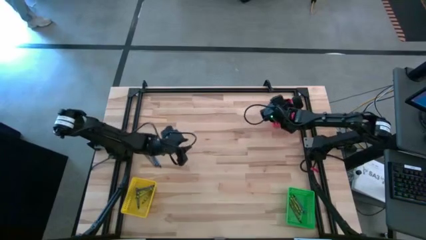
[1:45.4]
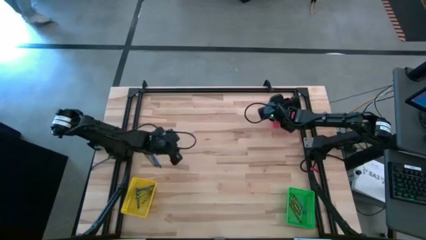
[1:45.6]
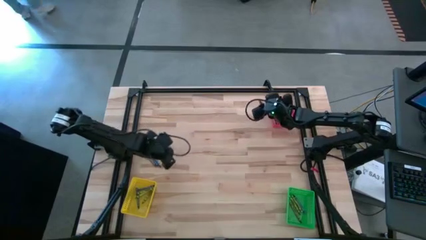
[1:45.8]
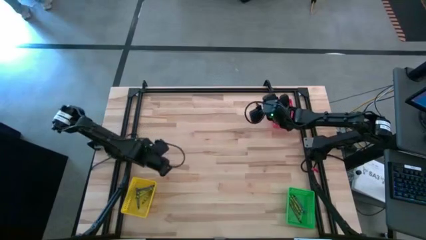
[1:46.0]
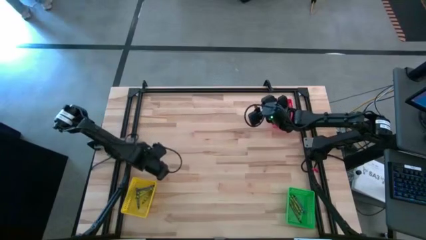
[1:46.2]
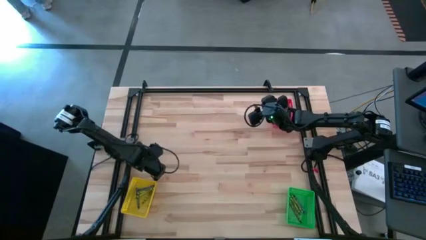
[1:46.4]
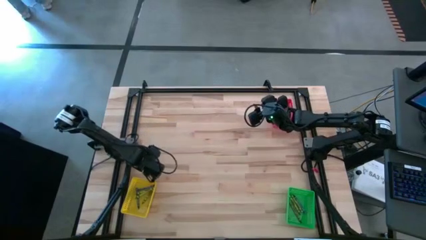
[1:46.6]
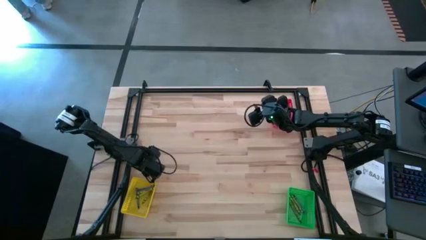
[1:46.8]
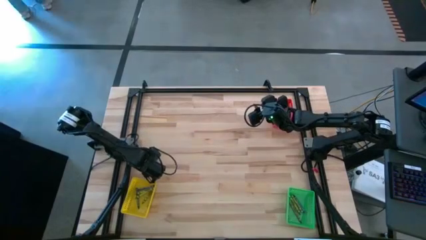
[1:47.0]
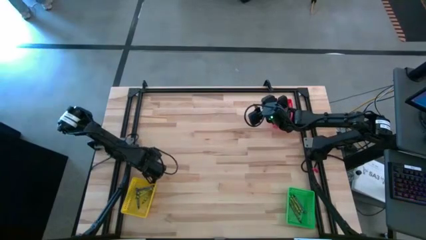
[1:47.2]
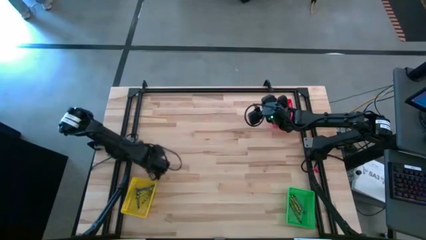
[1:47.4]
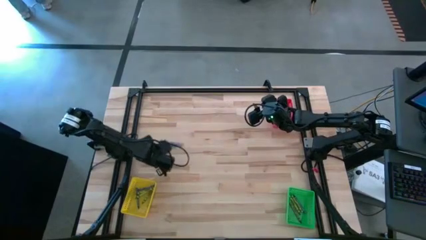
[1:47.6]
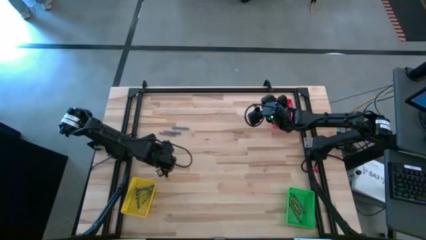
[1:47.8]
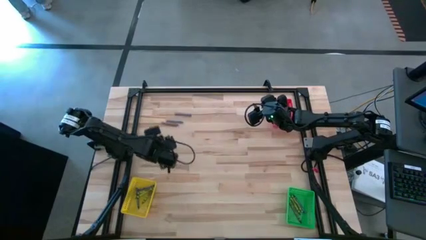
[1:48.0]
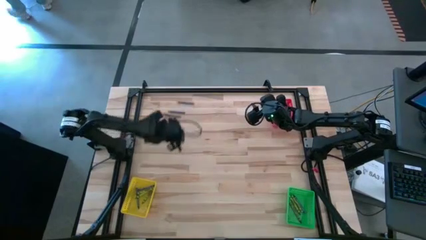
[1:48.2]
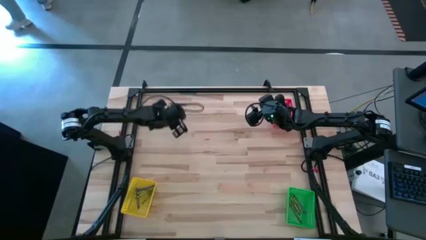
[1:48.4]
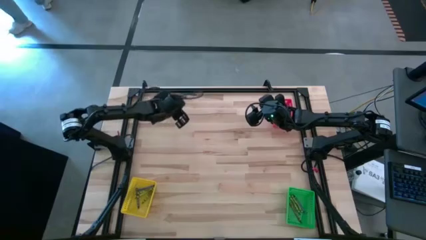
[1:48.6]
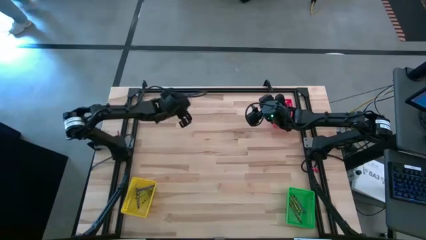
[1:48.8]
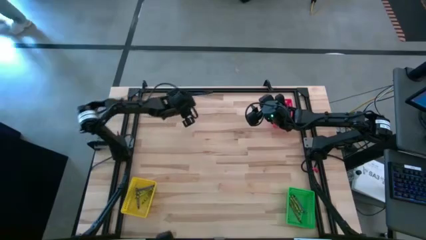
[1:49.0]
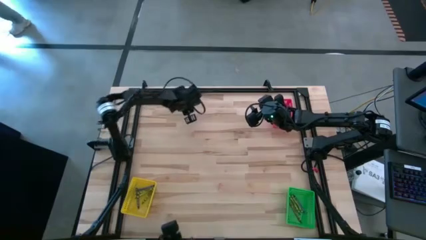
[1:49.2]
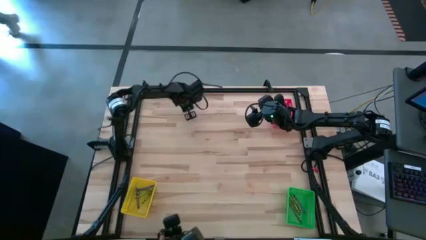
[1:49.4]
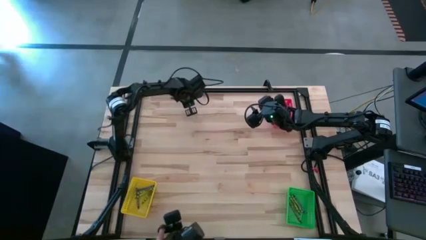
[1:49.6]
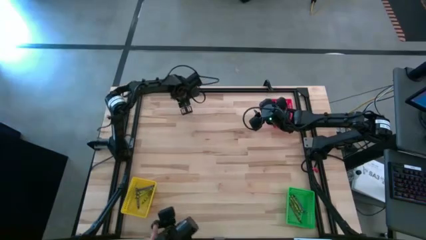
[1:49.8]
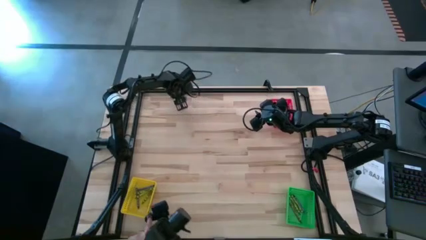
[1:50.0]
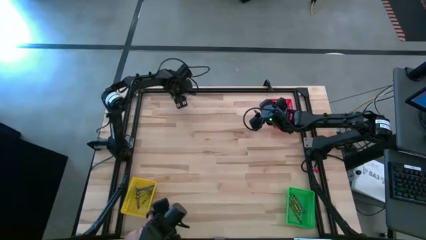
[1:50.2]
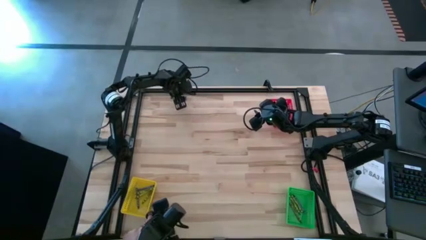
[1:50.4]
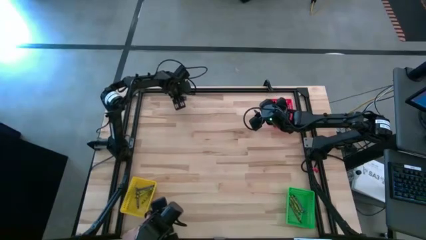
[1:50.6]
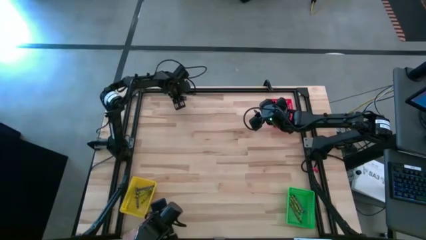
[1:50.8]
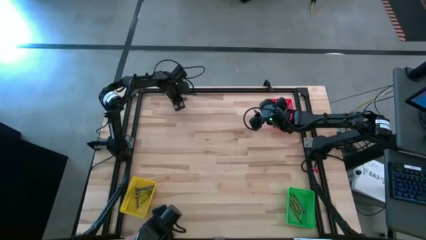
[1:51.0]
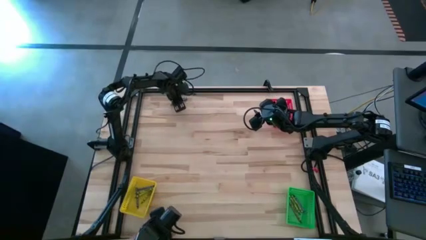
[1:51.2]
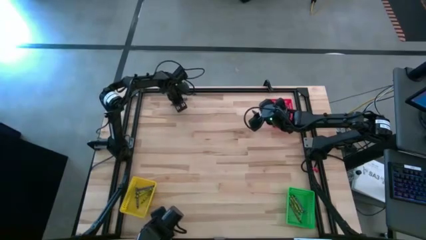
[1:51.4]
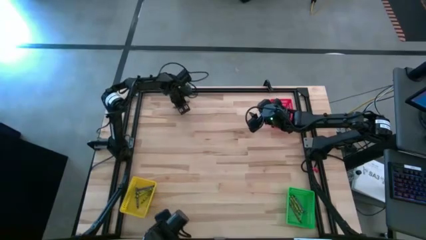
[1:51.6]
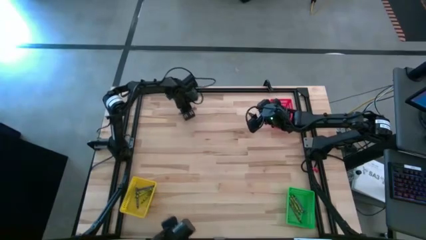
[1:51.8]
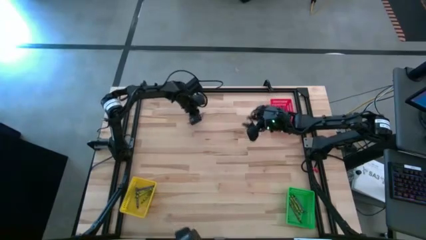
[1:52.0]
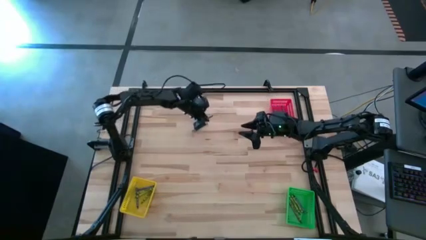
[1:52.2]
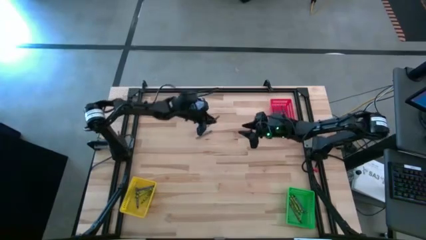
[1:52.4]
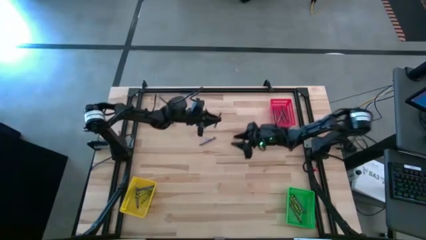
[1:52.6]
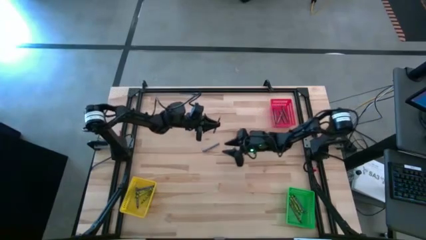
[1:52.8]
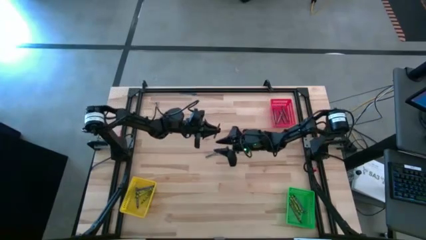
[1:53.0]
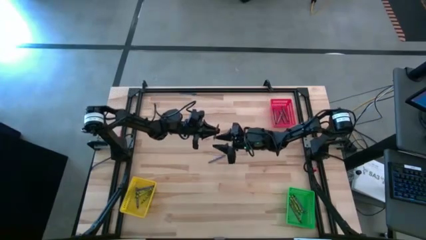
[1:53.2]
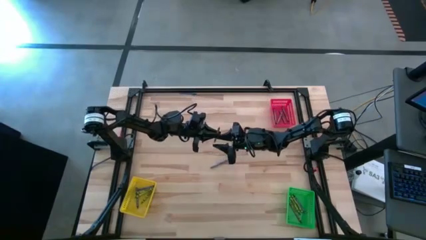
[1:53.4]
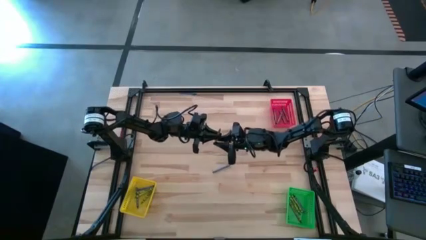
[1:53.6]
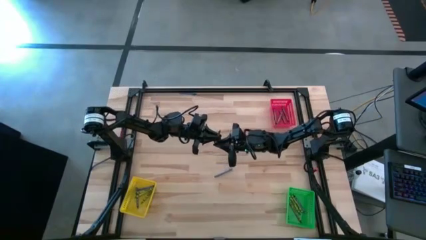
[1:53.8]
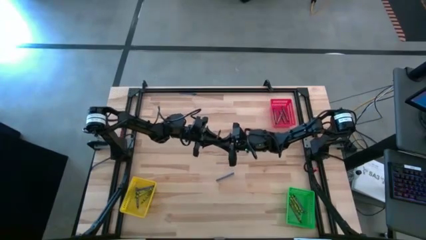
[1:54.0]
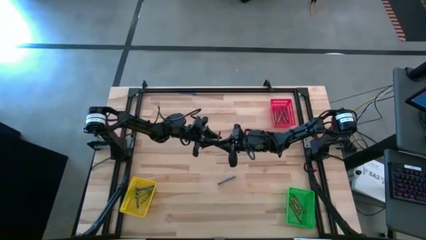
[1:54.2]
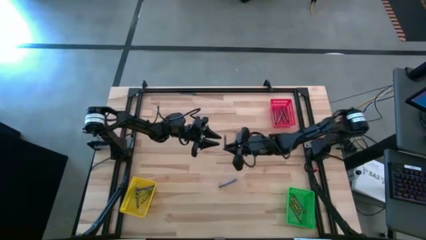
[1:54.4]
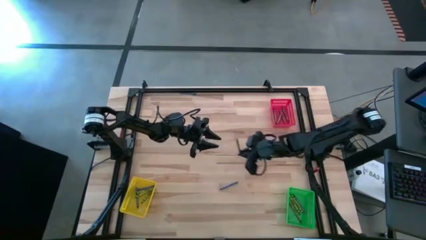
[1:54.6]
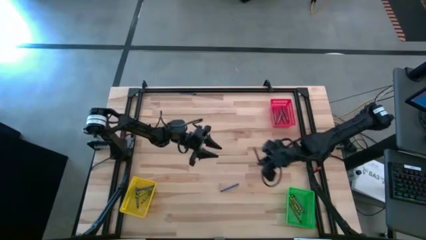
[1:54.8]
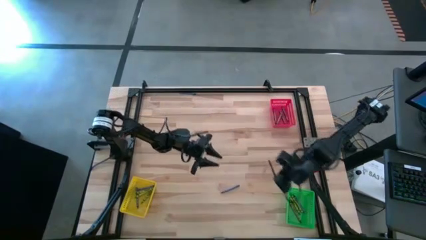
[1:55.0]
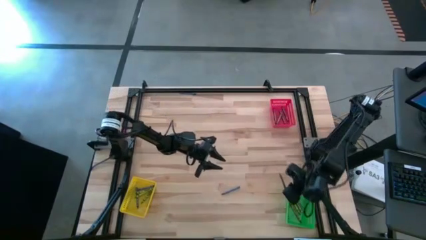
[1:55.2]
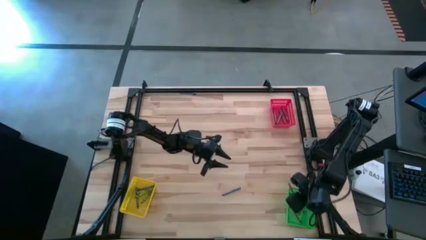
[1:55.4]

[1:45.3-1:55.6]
Task: Sort crayons
Put the brown crayon into the green bin

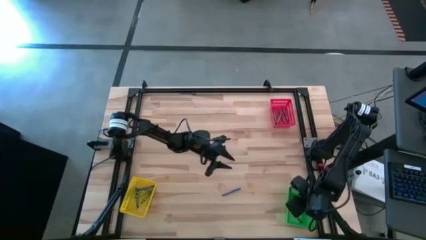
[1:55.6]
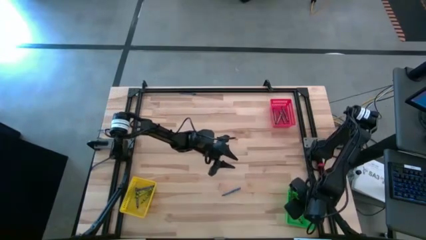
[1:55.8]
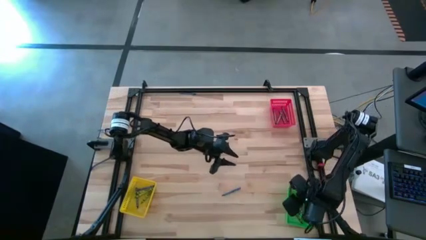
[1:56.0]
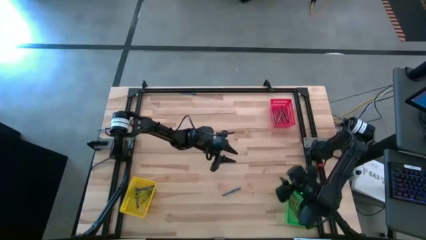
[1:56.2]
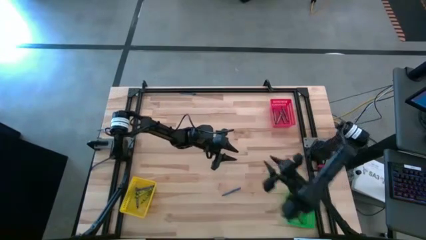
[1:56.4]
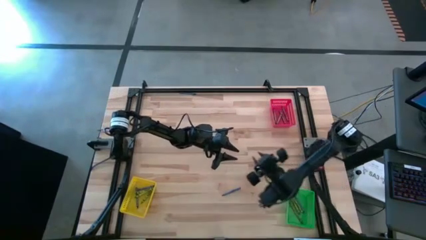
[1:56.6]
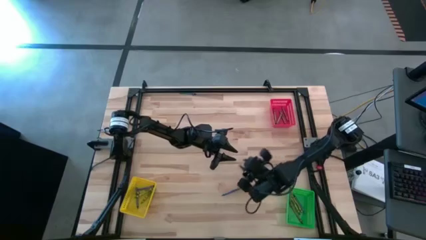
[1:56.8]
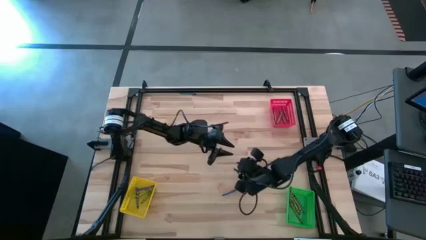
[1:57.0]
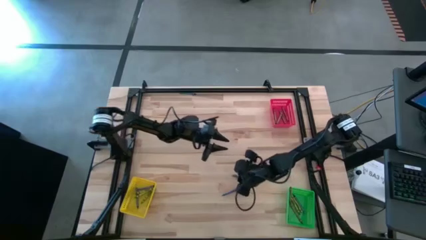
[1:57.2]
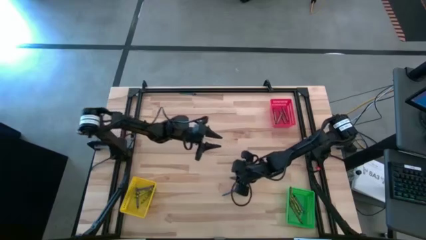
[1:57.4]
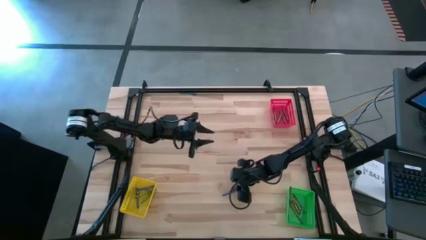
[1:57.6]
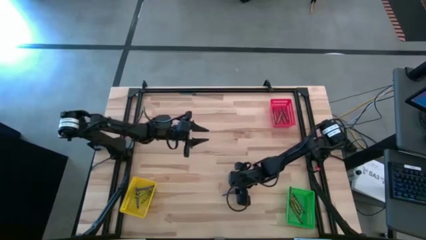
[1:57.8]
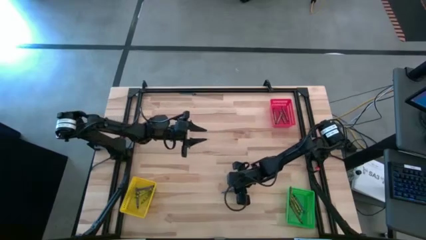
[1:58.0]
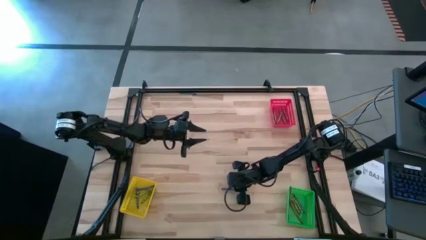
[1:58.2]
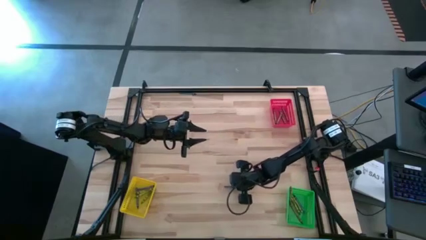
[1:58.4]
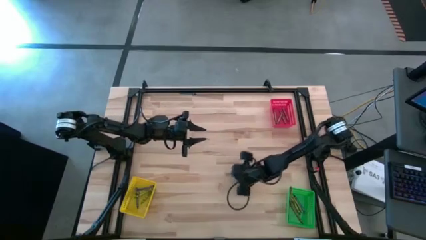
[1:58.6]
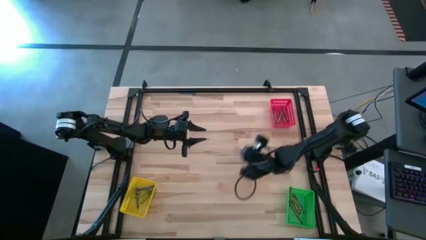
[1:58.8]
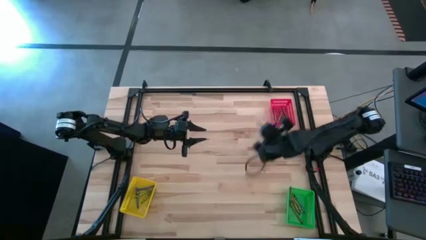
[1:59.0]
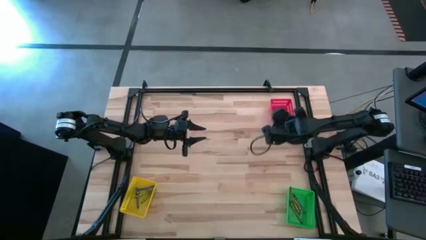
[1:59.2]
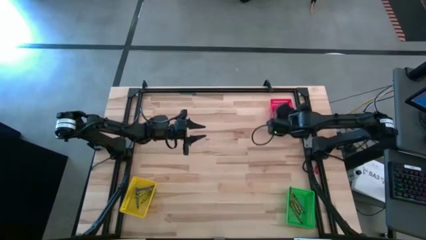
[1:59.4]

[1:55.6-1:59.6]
Put the blue crayon into the red bin
